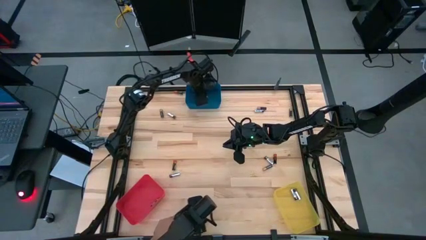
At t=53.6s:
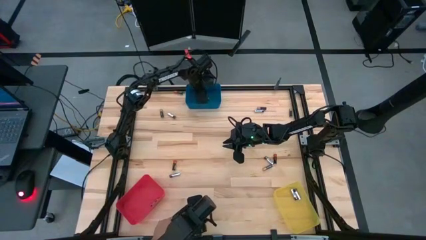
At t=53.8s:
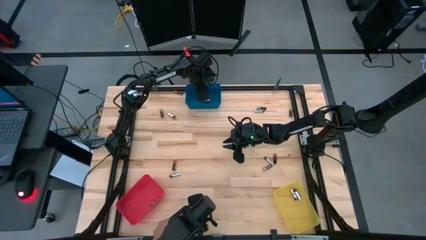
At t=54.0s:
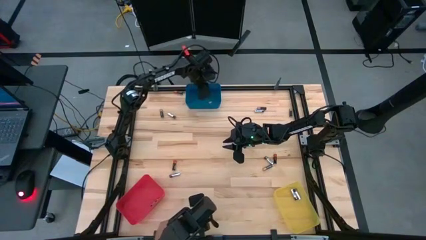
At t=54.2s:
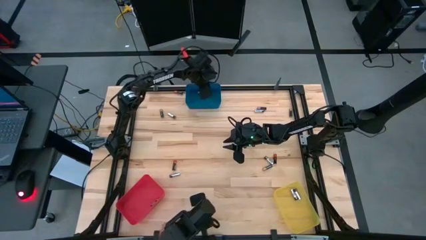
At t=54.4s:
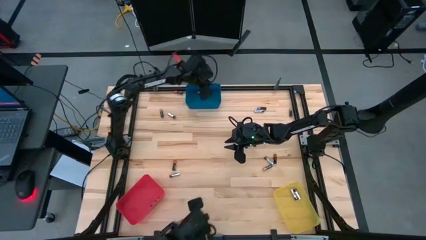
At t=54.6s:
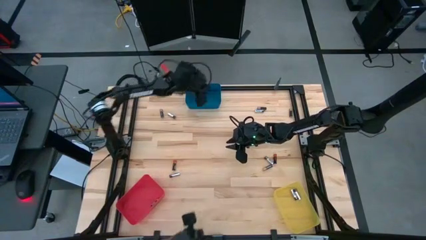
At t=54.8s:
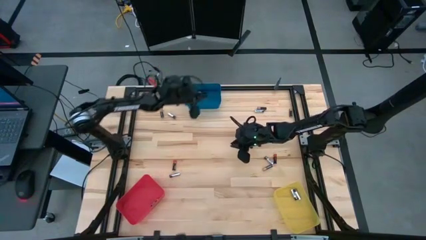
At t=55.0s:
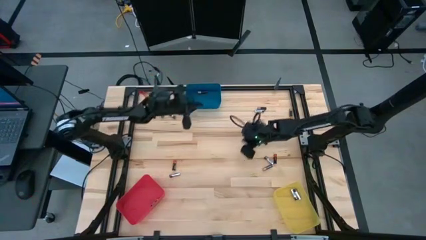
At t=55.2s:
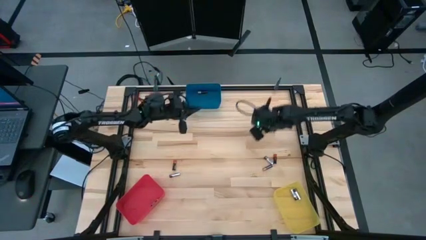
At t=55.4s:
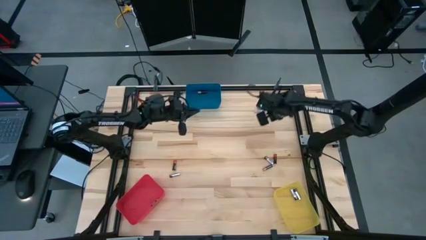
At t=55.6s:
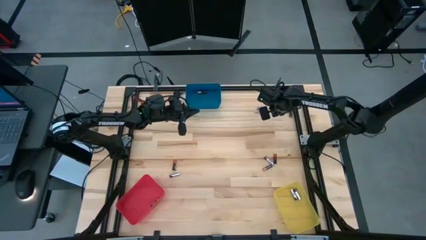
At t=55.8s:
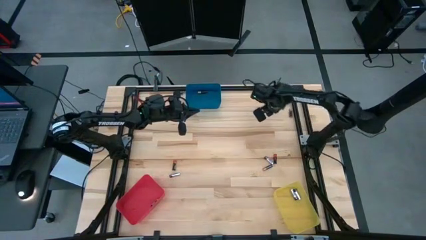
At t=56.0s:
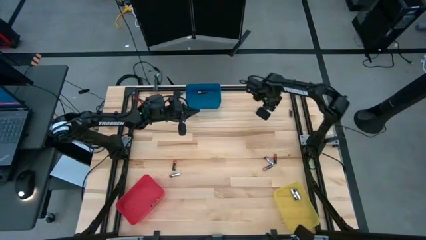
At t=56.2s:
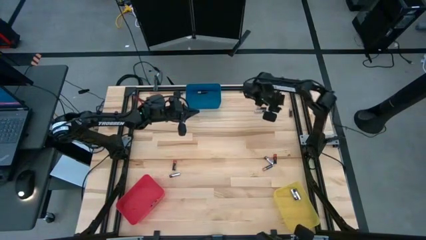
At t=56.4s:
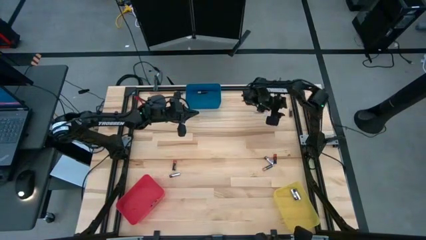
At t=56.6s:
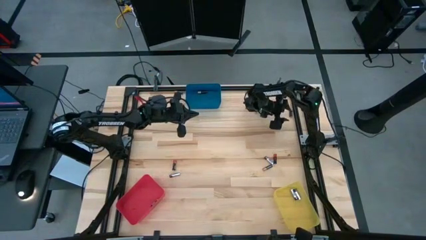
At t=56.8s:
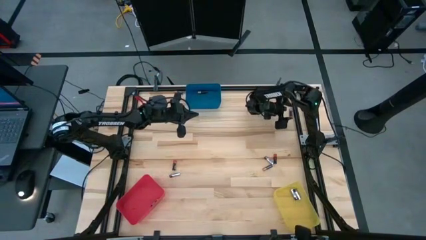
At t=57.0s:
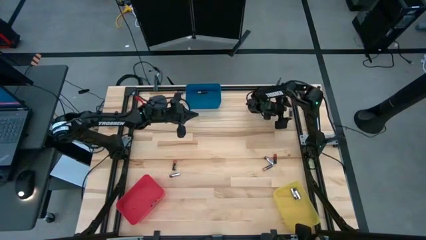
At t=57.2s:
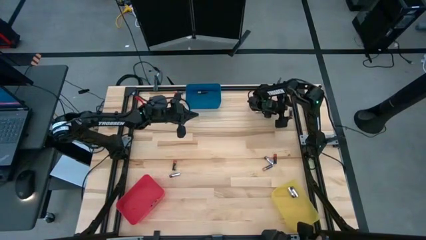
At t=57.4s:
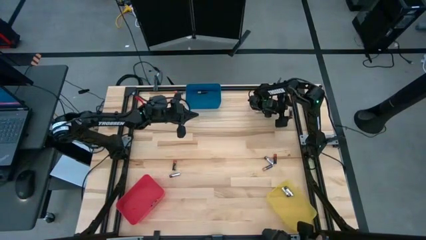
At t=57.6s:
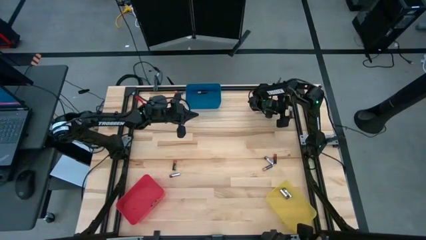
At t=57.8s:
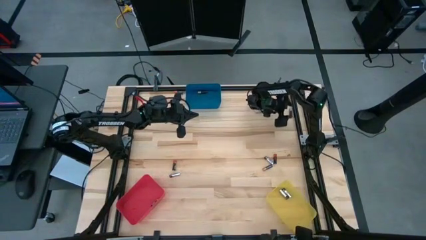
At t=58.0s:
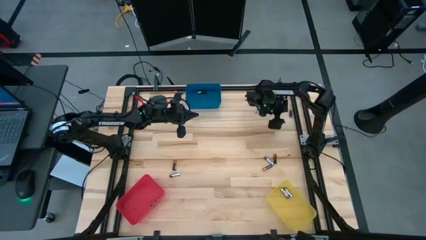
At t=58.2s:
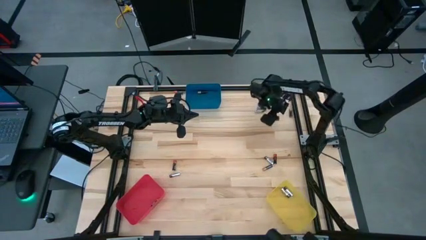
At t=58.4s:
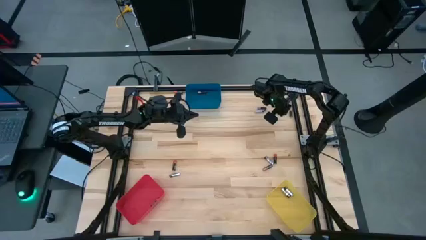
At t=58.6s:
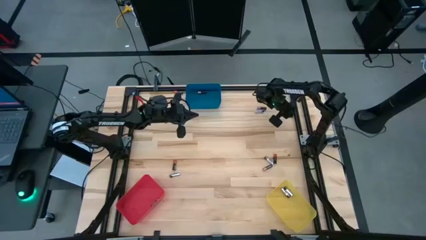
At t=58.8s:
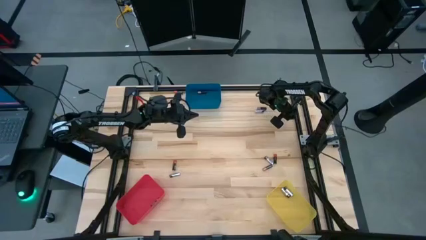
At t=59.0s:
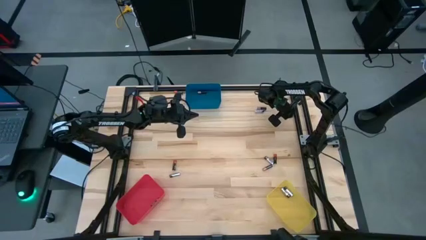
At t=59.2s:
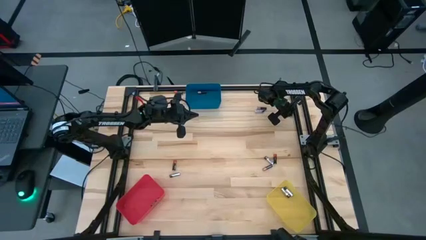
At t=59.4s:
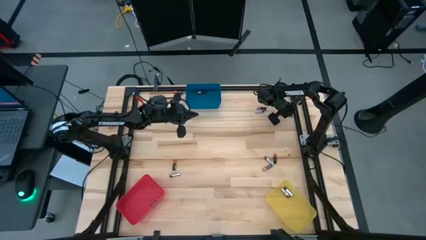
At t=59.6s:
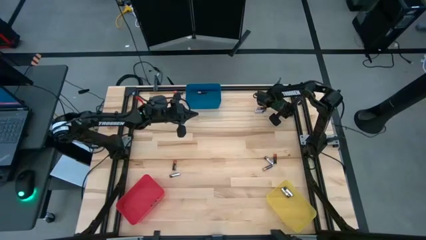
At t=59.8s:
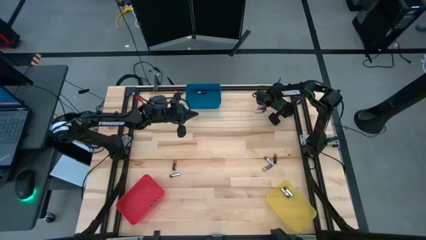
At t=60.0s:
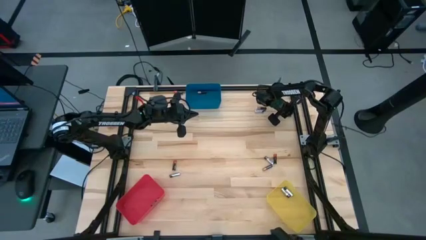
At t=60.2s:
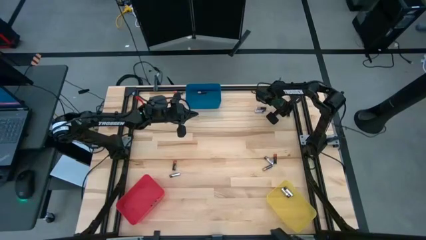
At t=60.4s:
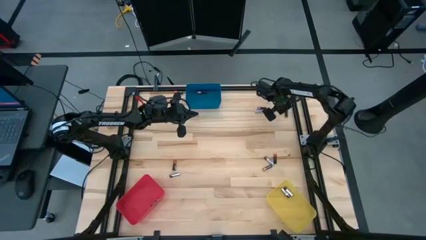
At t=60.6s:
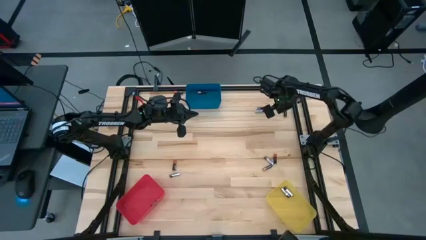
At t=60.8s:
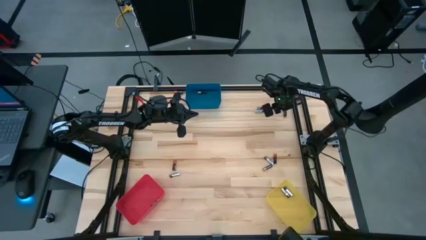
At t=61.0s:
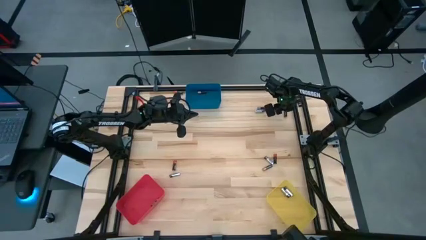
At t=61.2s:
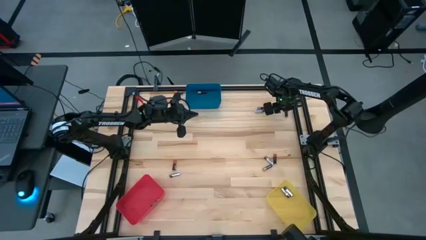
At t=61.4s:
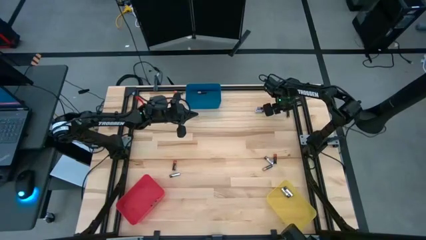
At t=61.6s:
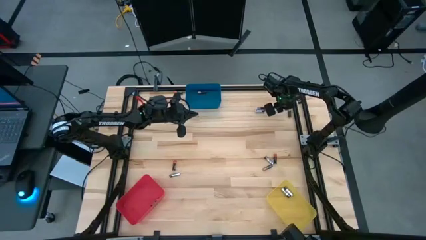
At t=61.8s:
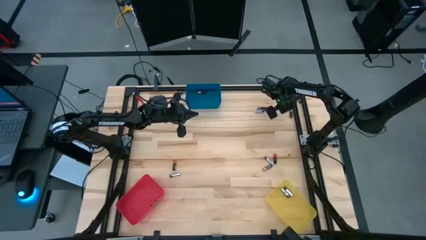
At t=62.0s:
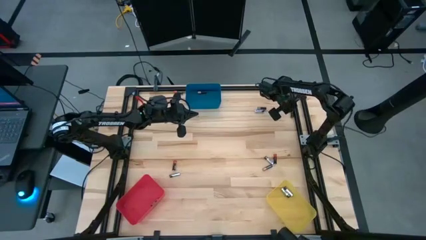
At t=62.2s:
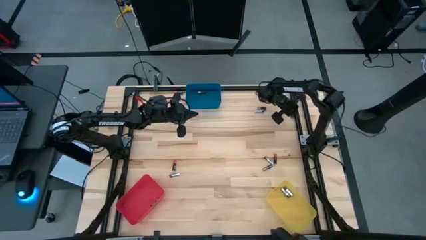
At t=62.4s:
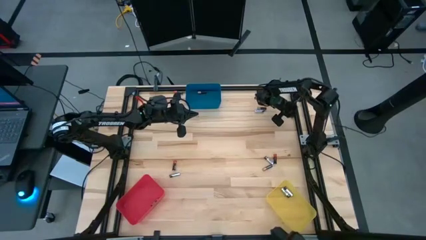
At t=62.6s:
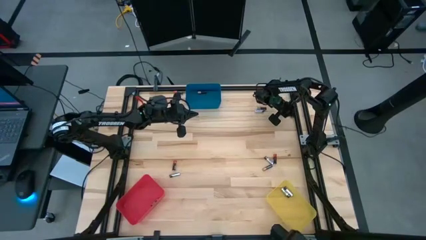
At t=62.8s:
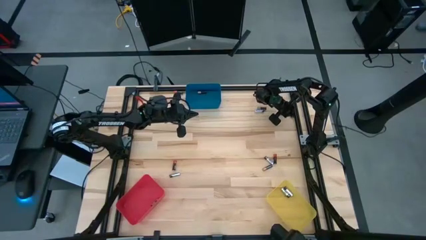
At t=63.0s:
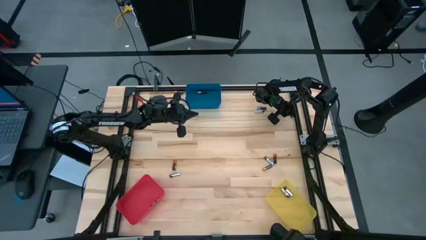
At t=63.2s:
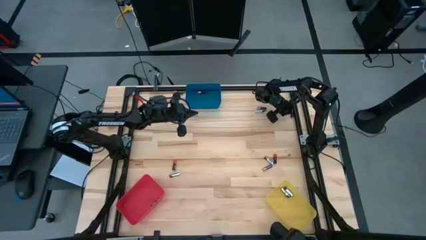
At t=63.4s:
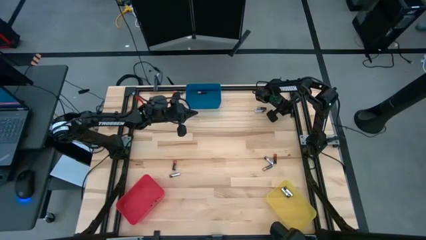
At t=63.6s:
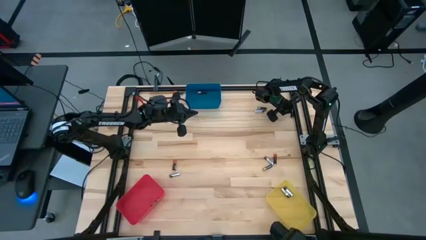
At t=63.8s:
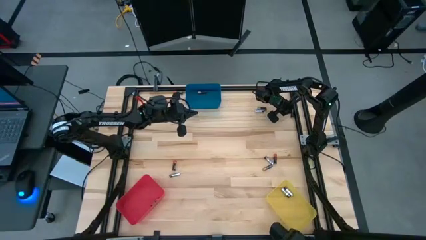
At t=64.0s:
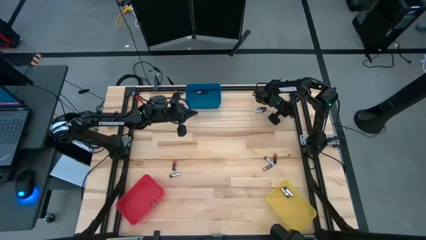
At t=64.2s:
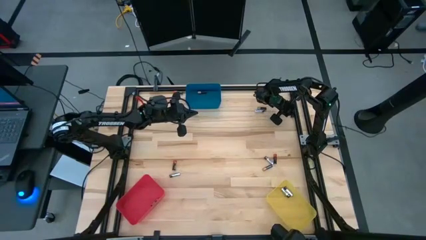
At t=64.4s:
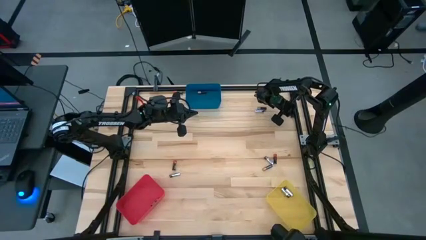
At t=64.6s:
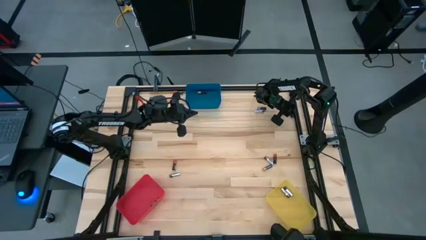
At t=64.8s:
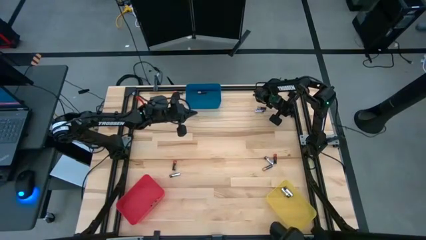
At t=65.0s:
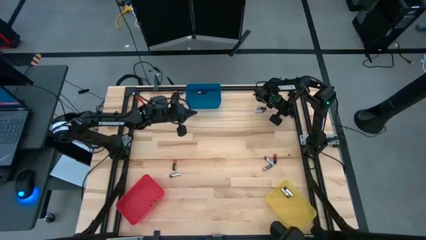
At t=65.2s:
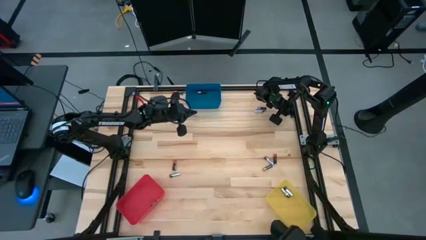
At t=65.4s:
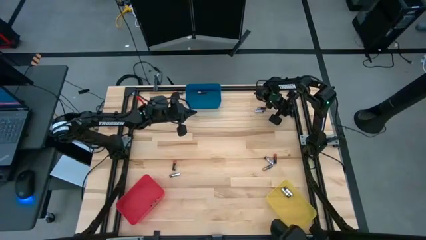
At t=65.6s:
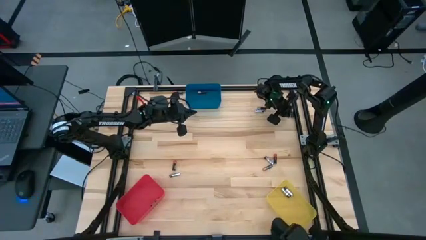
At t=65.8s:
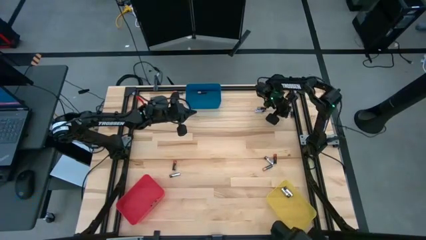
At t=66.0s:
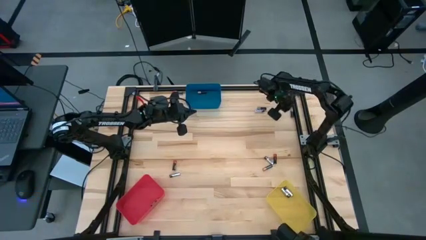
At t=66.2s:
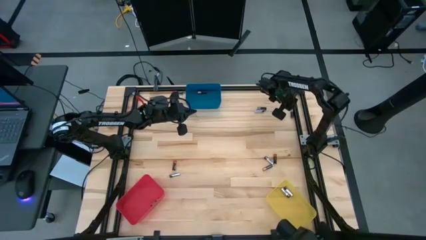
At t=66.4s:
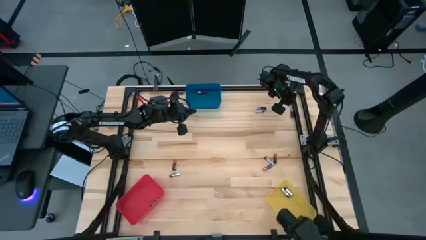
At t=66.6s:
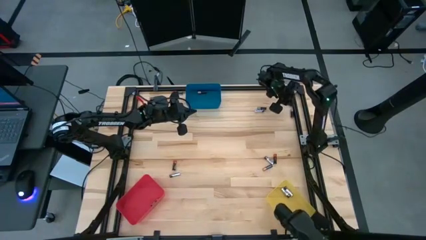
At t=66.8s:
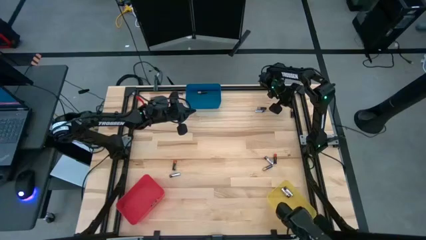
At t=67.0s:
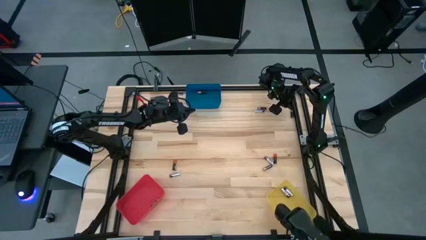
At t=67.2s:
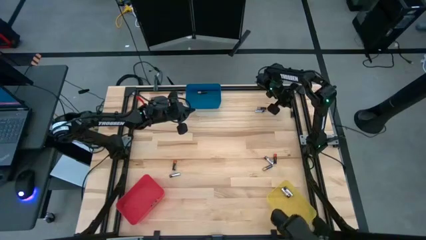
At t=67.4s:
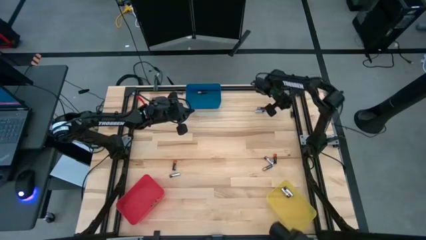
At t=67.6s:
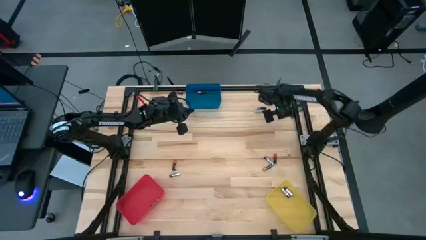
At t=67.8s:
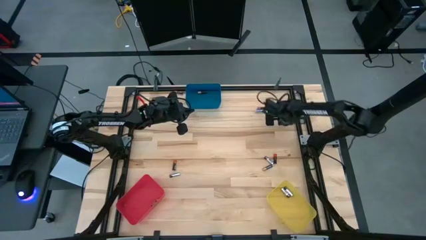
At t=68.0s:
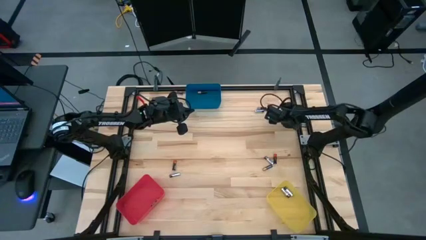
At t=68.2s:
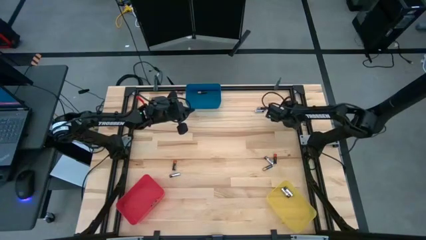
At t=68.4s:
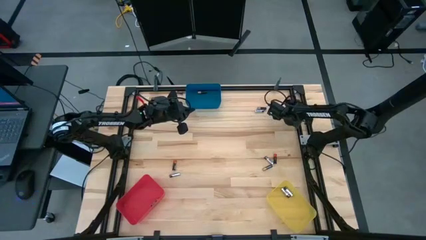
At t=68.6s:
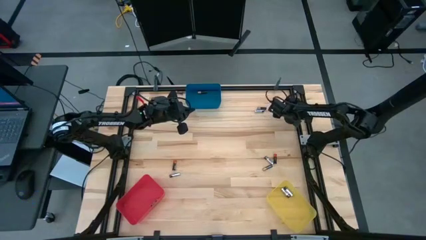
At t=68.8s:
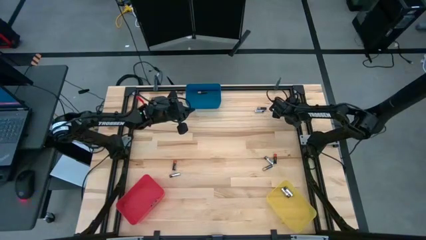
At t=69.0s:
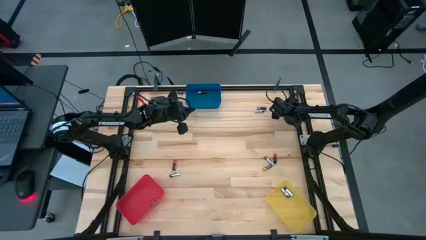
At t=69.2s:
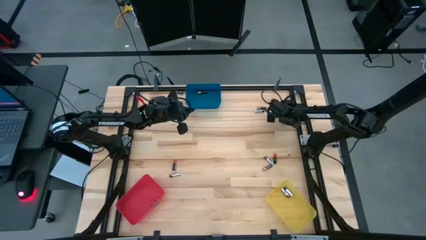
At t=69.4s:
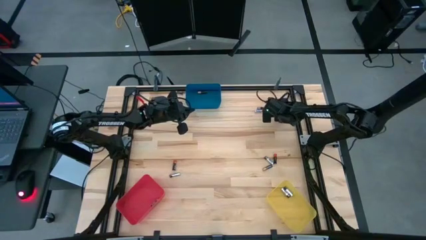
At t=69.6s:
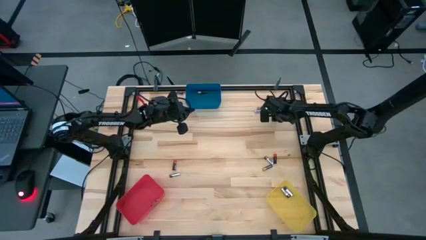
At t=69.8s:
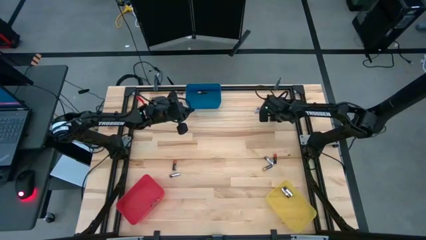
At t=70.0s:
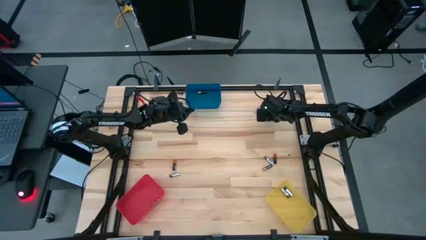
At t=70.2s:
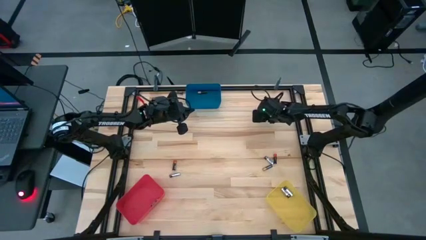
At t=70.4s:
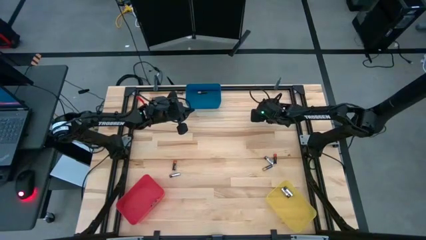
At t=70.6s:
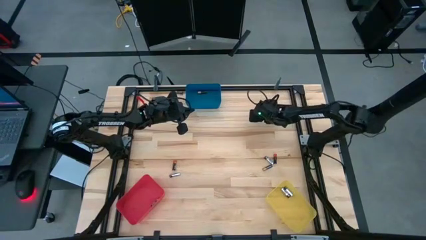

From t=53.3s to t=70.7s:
Task: Sort batteries
Put the black-brown battery into the blue bin
